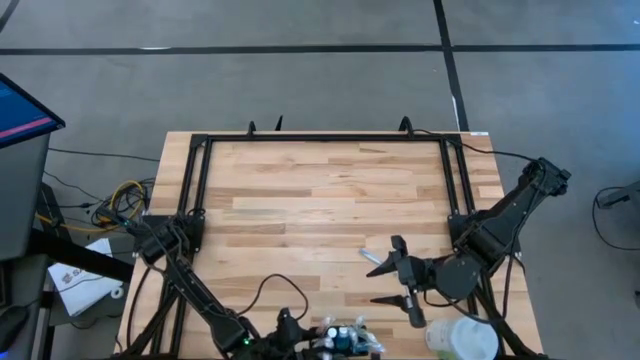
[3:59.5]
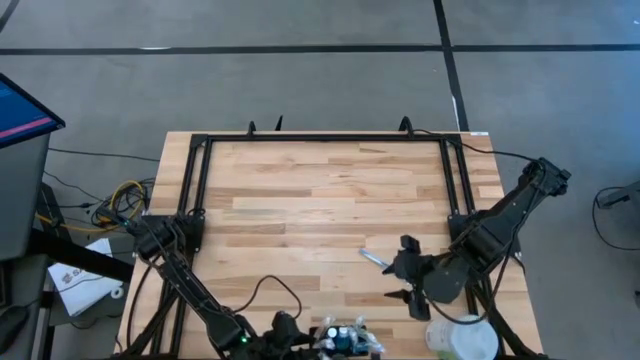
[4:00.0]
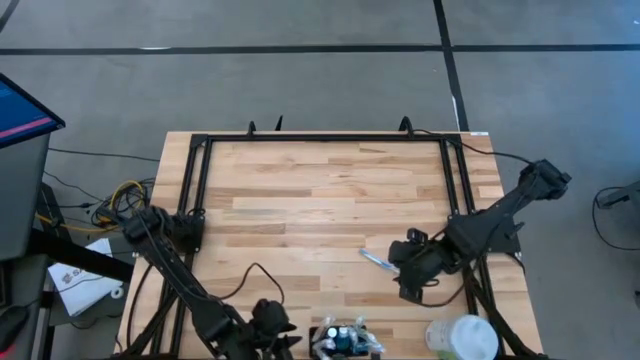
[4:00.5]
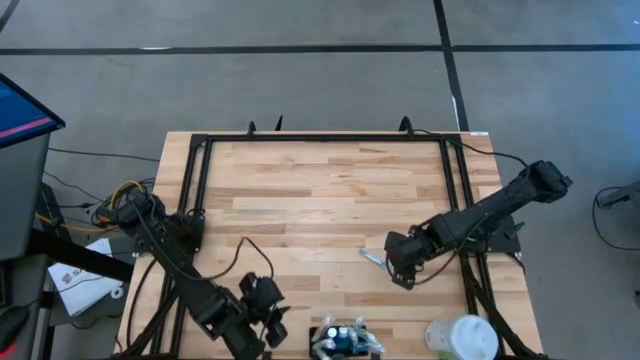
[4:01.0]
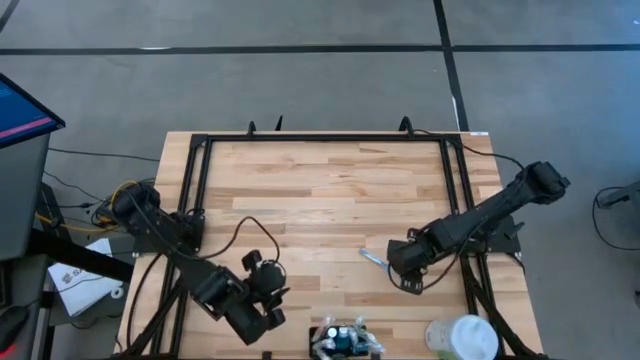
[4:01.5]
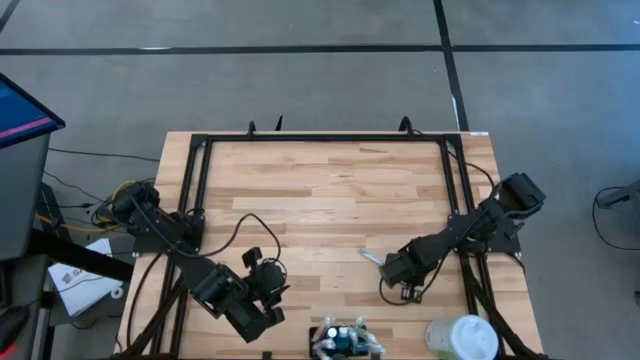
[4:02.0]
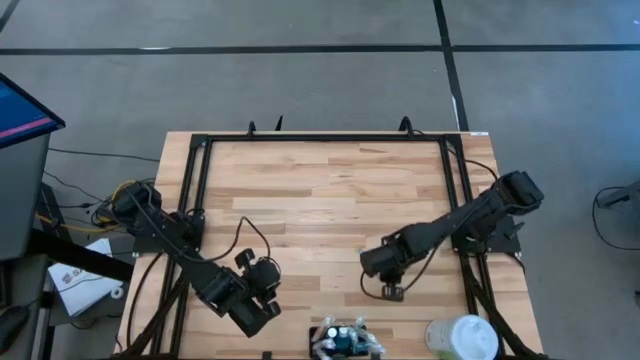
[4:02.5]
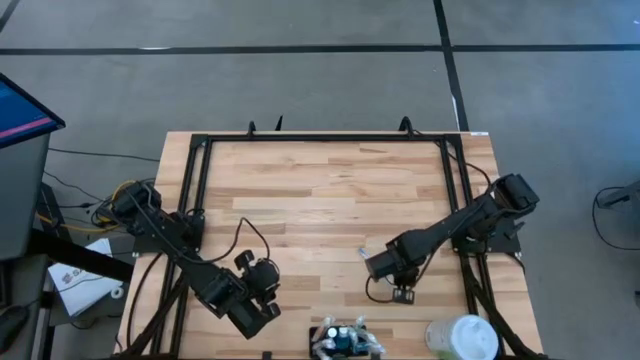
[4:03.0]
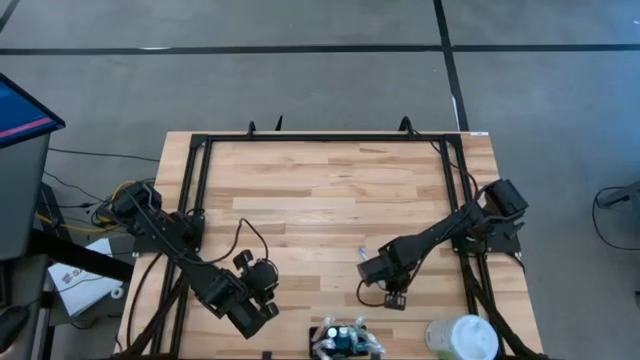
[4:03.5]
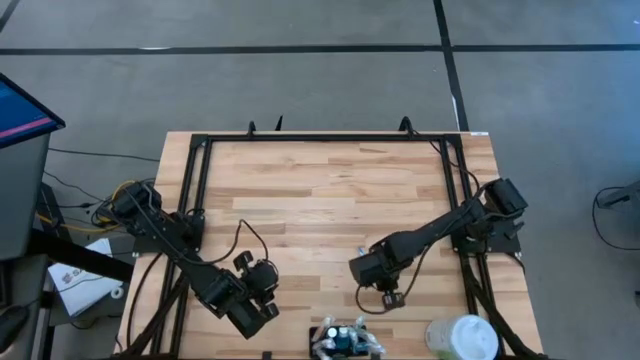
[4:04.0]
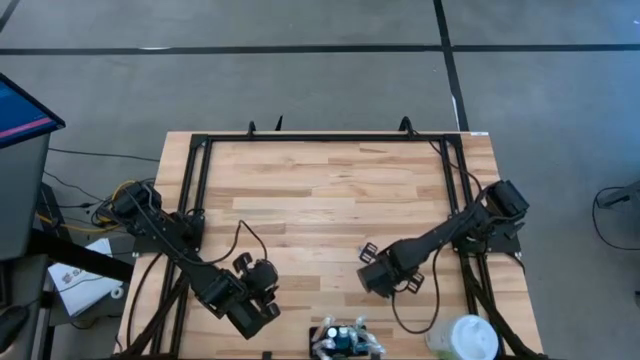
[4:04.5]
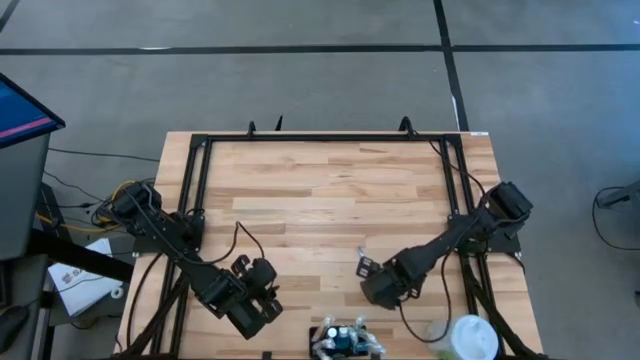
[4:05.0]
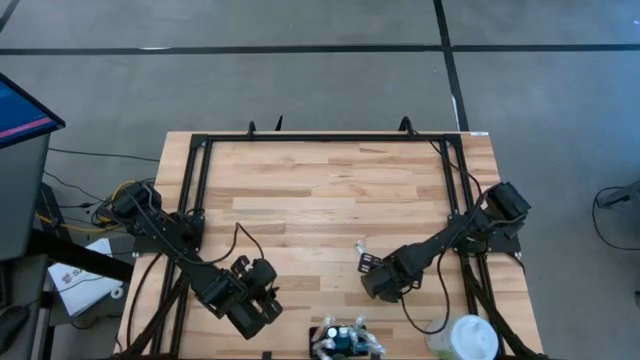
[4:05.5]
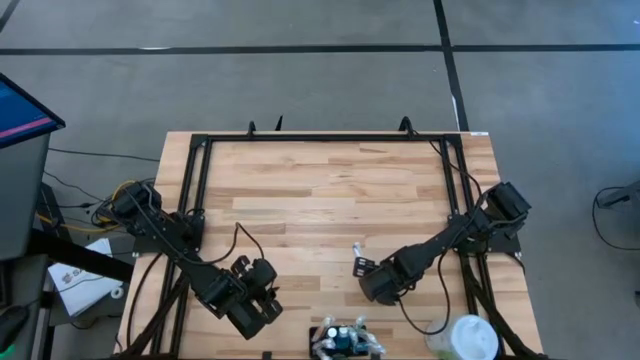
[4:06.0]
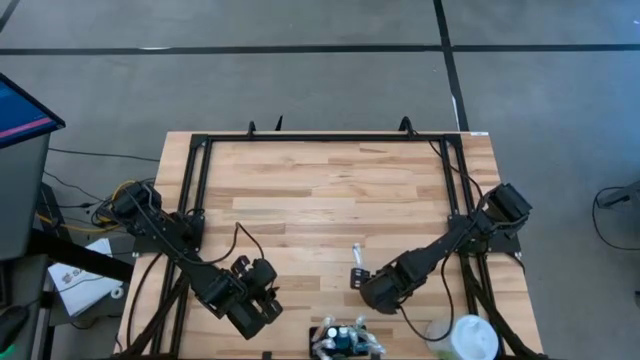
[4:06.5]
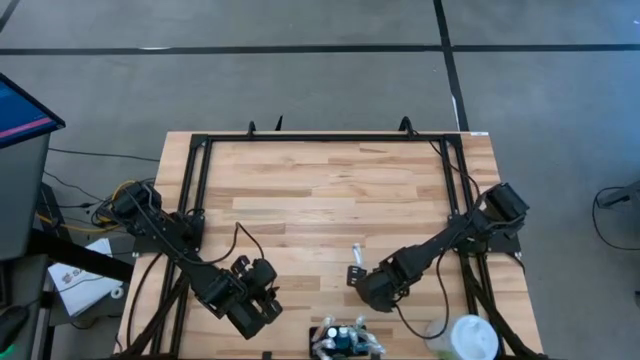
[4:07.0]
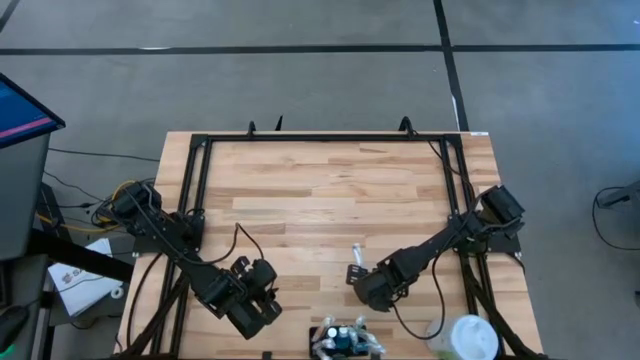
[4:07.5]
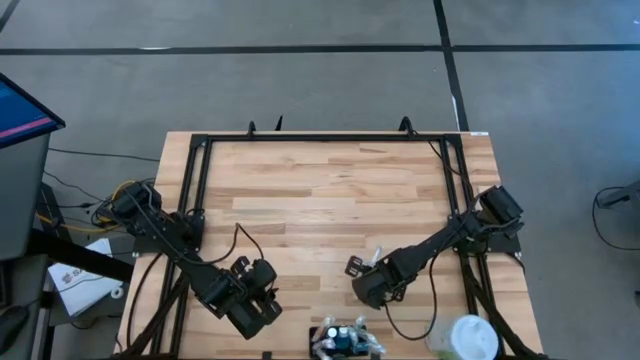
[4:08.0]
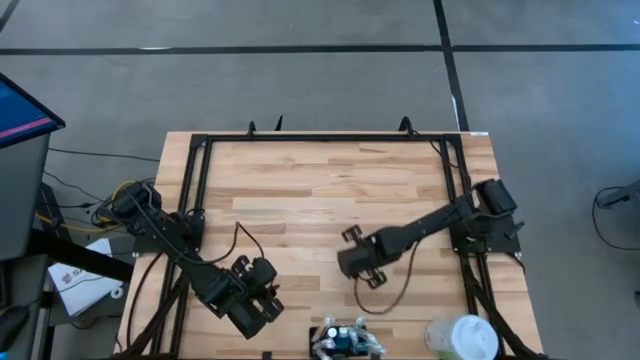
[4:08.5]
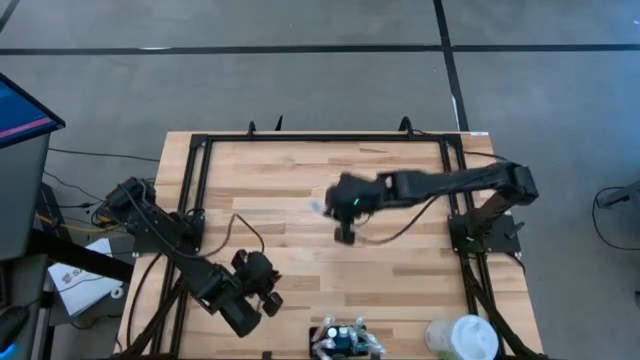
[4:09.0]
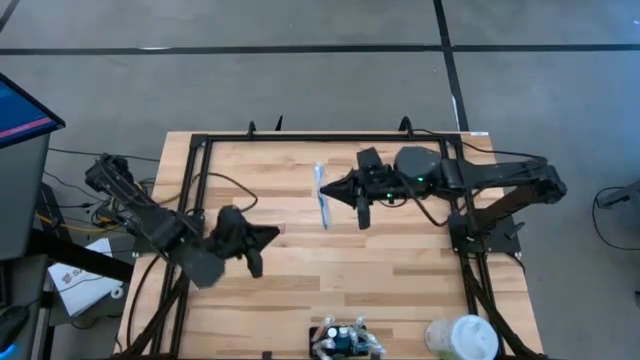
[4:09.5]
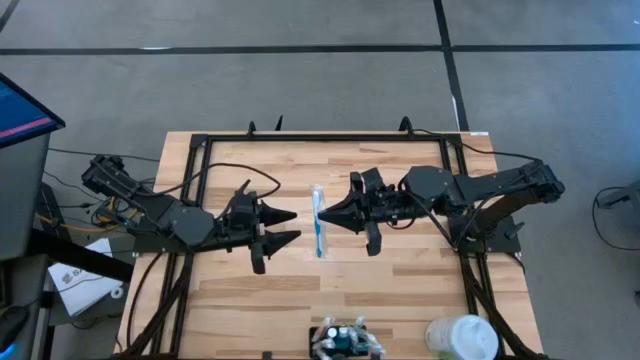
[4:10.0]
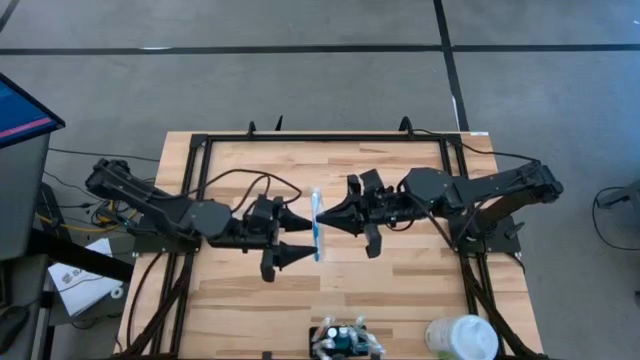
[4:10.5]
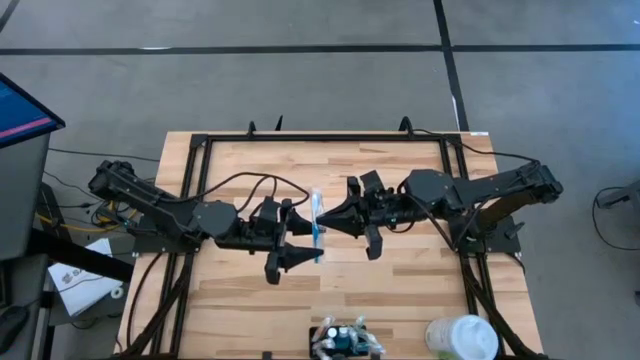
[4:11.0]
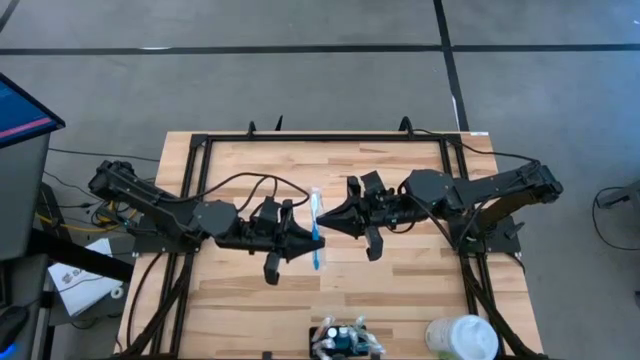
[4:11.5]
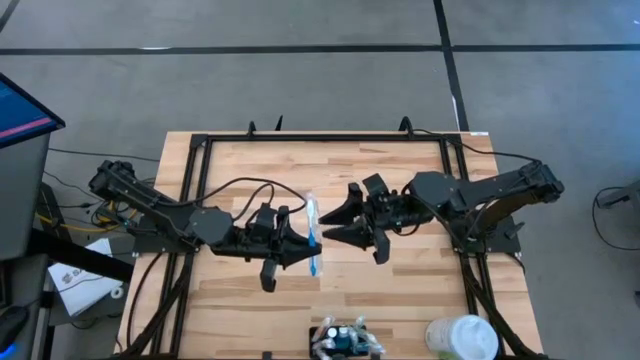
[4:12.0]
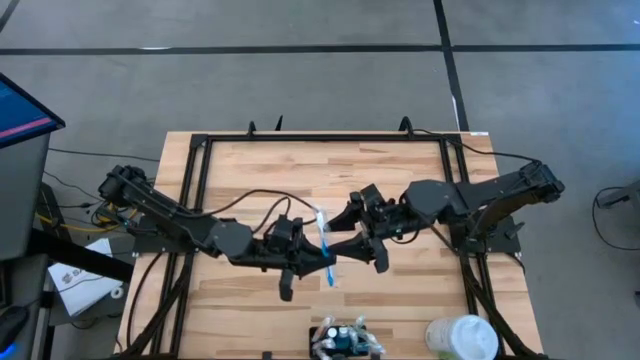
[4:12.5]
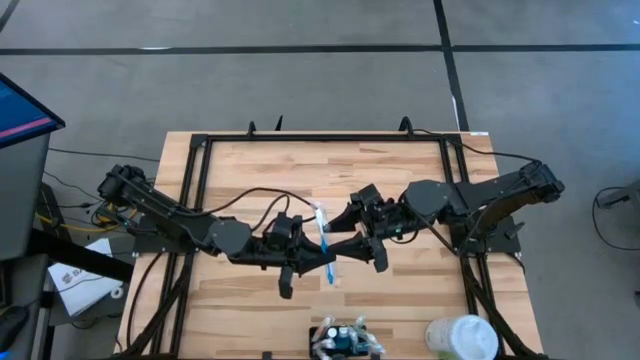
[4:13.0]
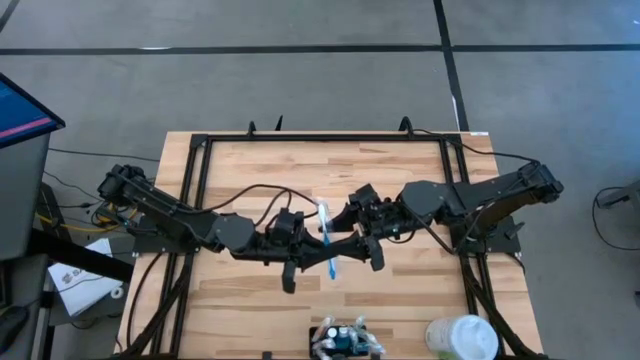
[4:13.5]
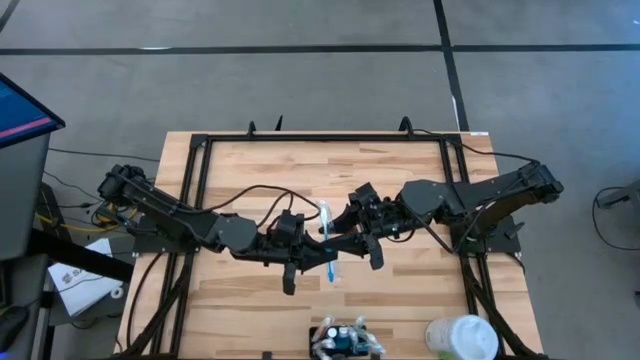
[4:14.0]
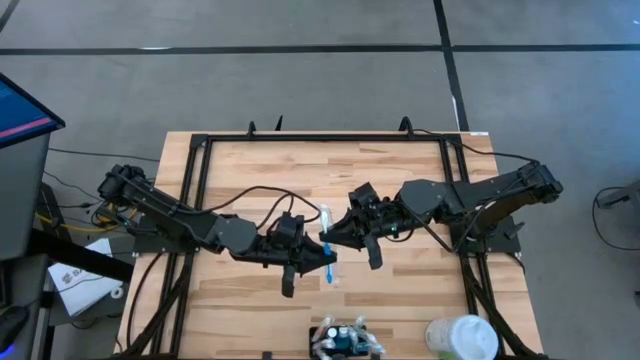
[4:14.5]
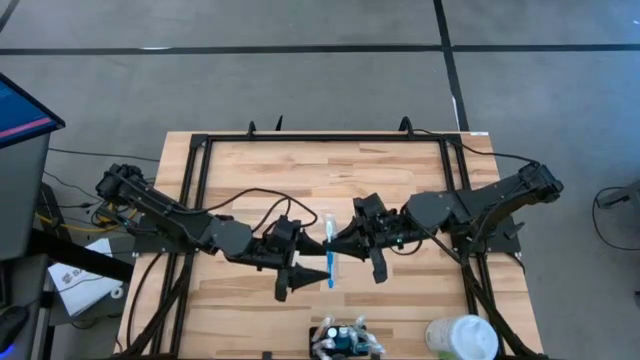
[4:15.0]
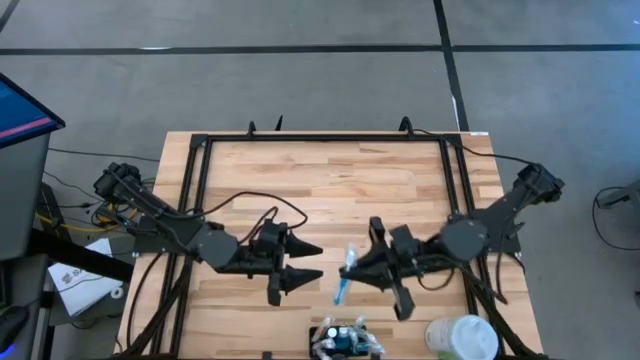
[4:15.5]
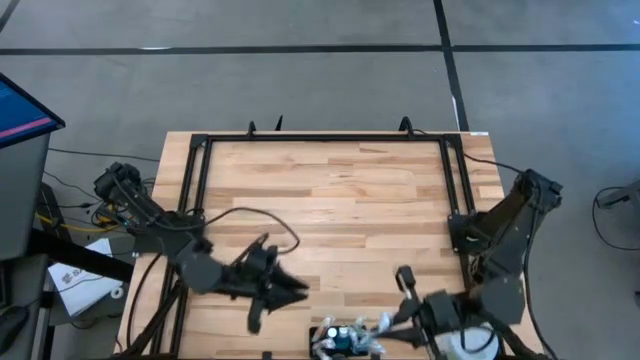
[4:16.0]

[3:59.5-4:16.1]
Task: Pick & Place toothbrushing station
Put the blue toothbrush into the black mesh organizer
